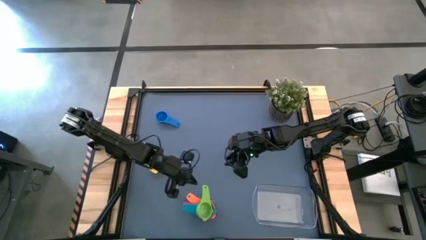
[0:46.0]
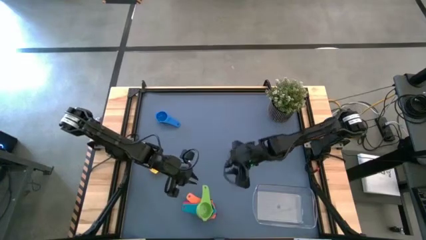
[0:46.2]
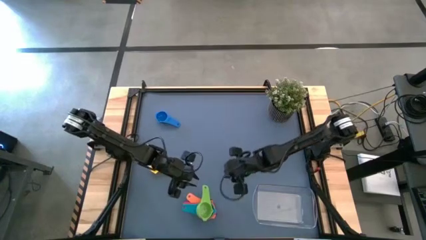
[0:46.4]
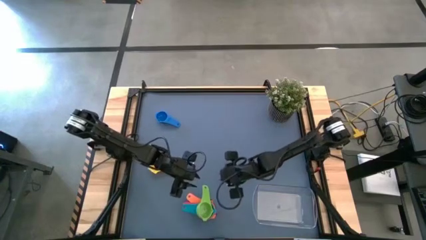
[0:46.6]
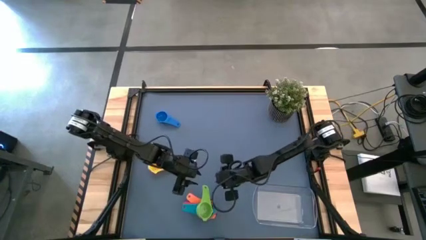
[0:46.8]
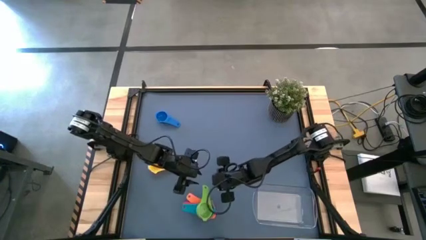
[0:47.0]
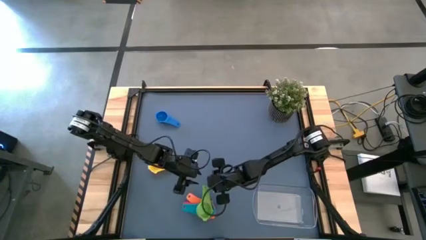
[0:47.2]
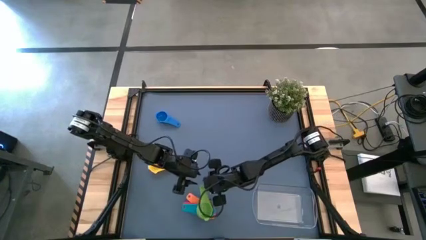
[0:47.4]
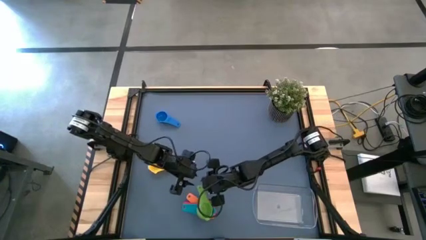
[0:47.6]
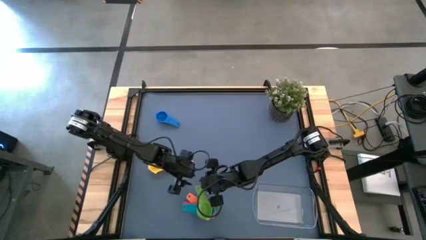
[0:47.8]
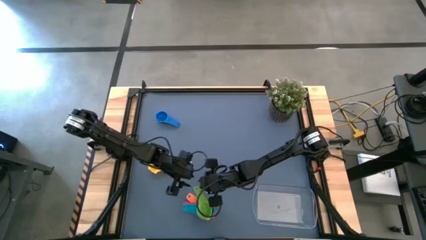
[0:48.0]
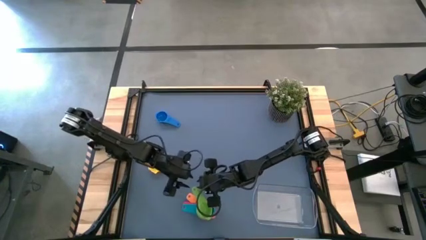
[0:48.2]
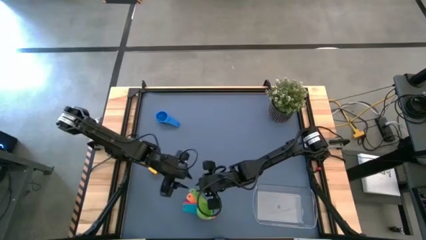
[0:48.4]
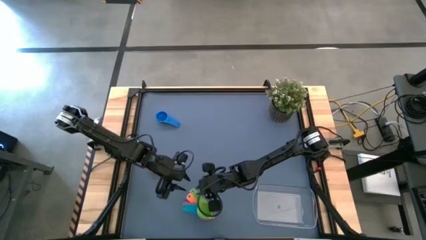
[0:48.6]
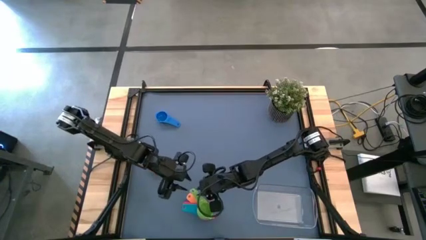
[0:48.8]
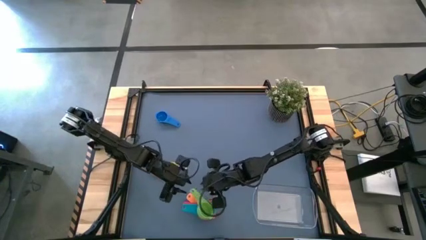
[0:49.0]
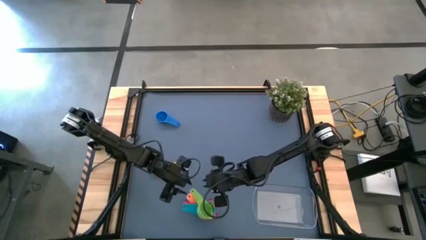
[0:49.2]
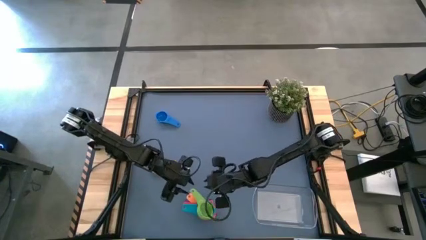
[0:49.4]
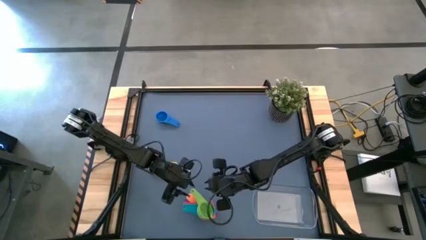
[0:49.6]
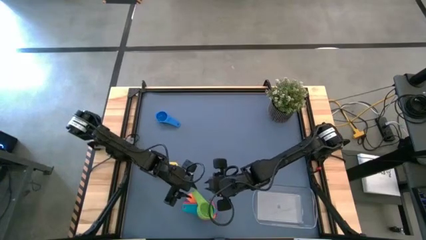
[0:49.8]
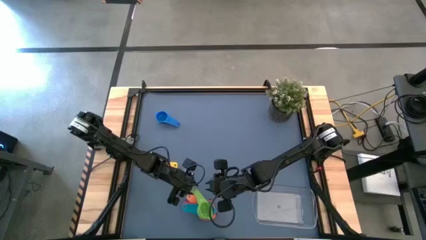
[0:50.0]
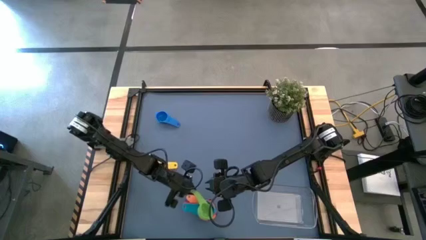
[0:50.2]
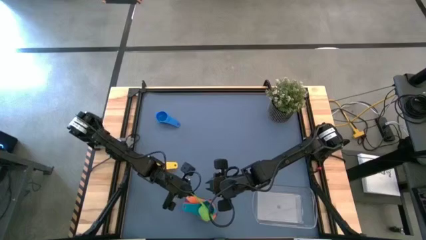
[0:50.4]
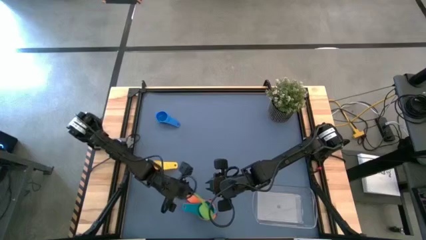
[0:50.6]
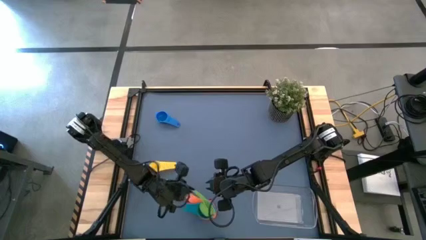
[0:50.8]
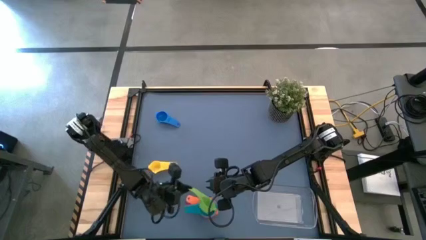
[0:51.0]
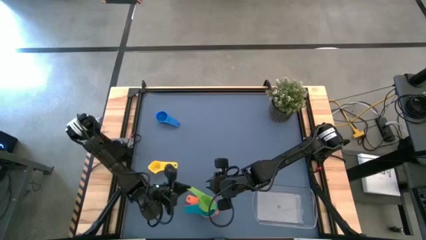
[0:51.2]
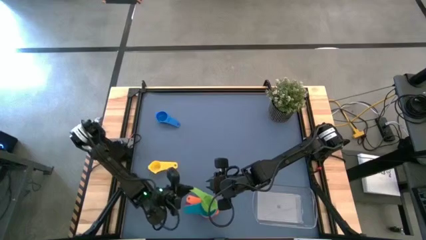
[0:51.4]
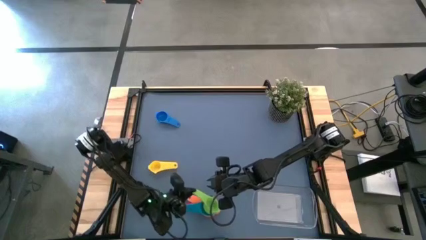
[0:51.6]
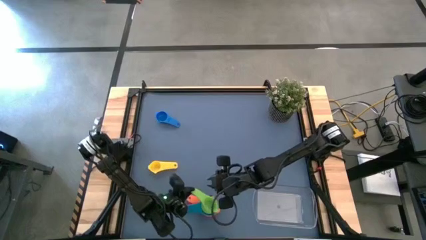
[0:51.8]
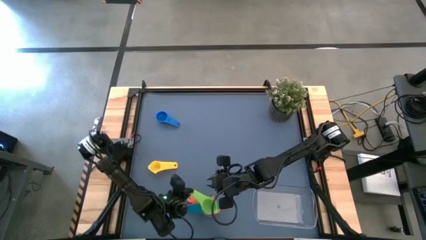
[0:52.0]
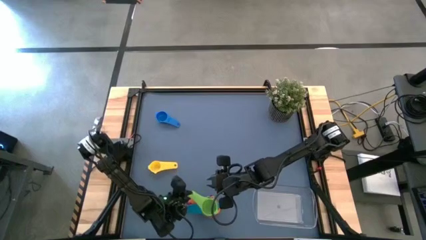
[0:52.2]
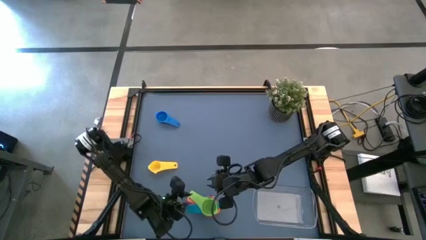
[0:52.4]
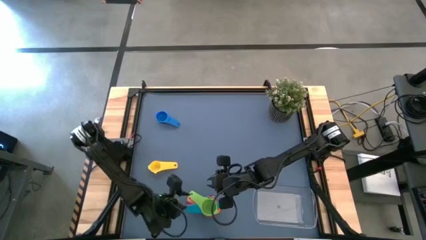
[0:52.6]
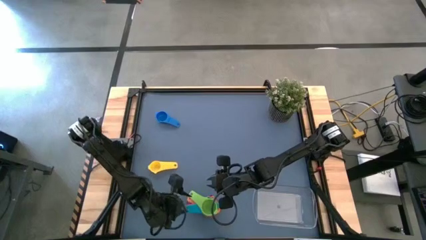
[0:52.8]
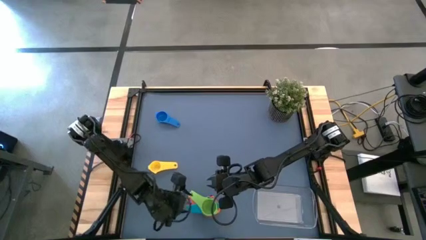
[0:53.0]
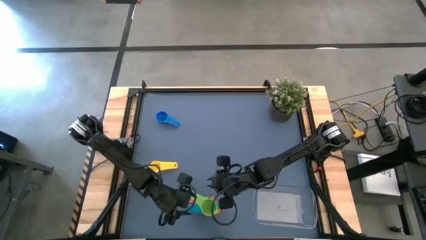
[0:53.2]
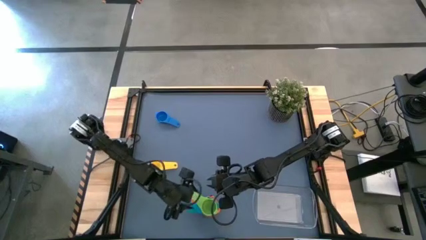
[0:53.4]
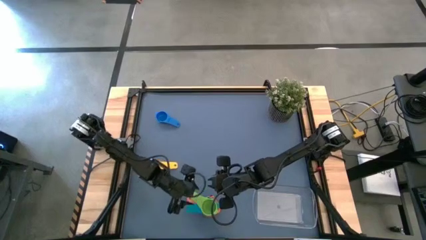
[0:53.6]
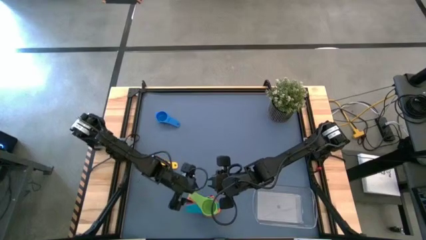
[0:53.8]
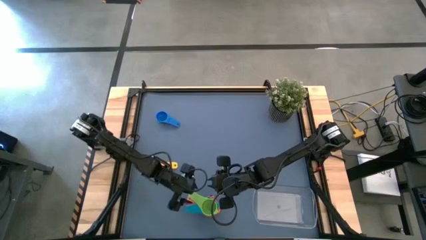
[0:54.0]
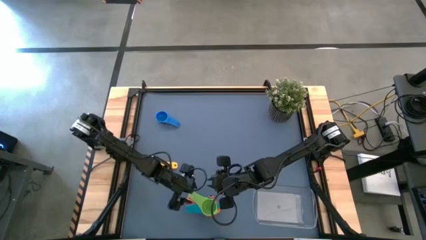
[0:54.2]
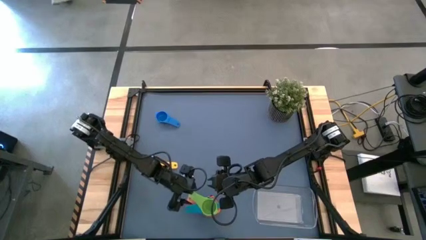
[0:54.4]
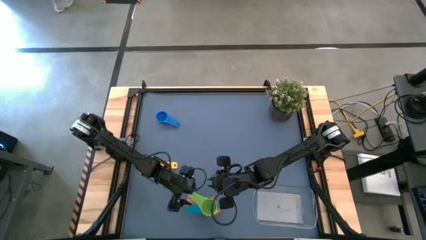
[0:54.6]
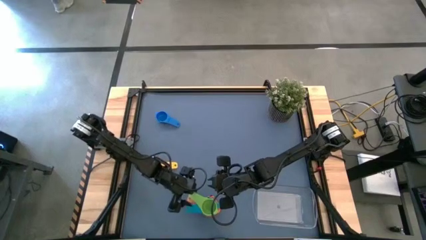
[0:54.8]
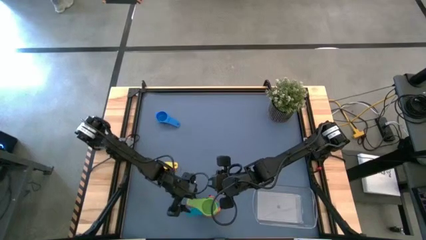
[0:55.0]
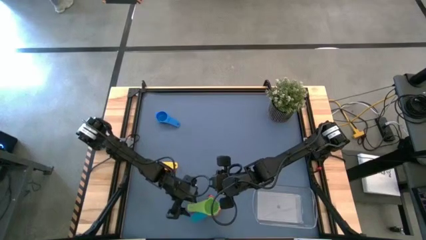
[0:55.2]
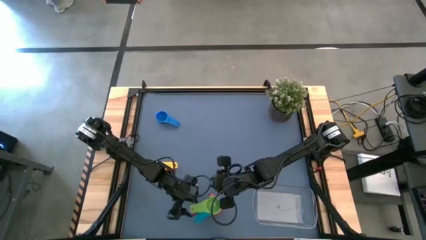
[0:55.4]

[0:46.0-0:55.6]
Task: Nest measuring cups in basket
Stack the light green measuring cup on top of the light blue measuring cup

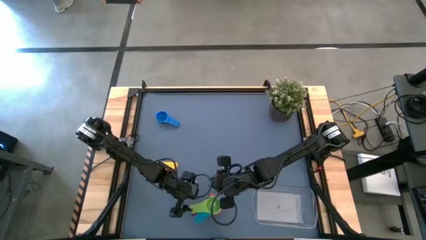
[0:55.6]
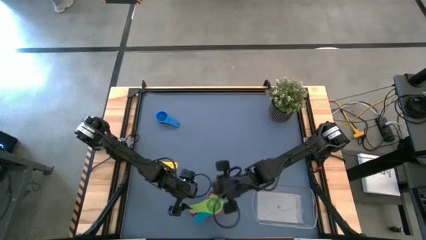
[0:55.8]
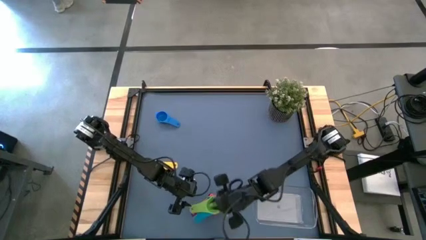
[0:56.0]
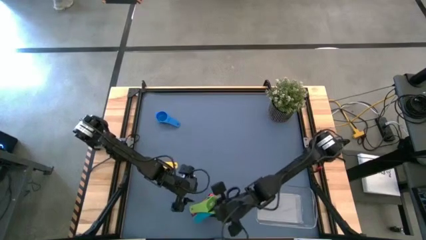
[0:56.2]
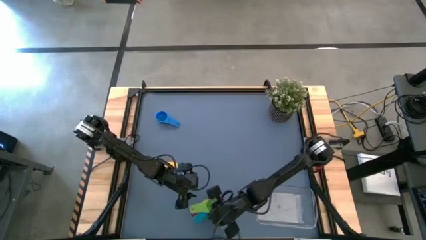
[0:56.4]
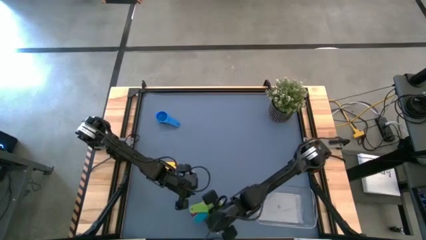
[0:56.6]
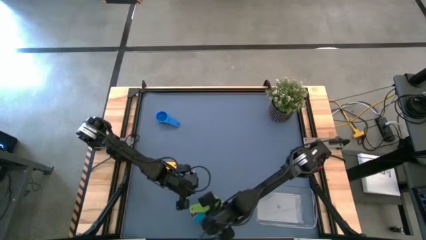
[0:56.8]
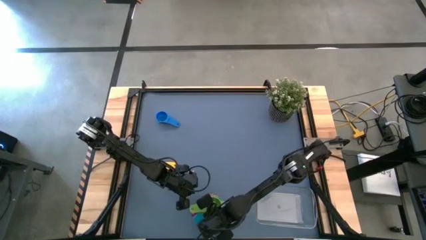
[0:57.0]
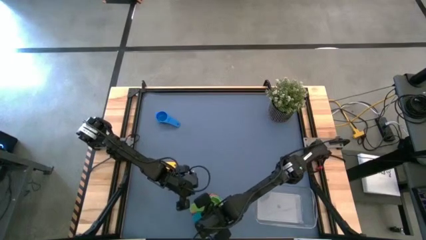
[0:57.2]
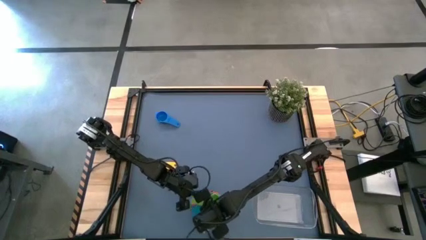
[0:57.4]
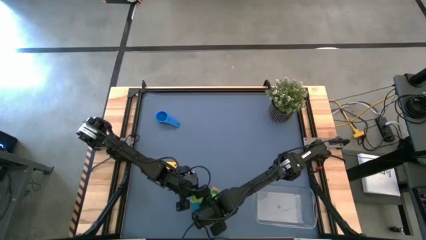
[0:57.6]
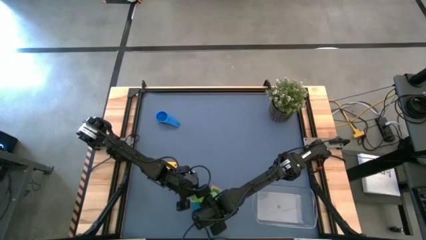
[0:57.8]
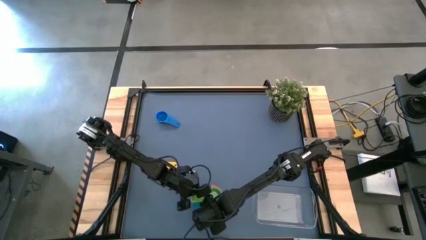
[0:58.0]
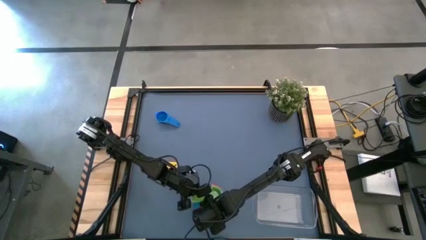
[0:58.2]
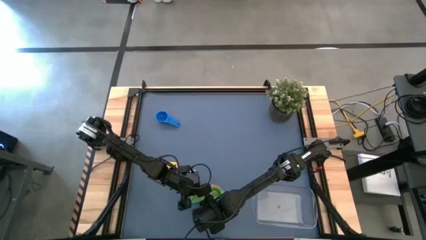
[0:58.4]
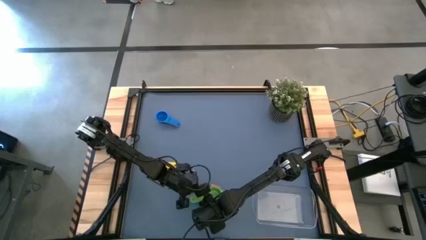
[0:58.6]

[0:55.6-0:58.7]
Adjust the stacked measuring cups
